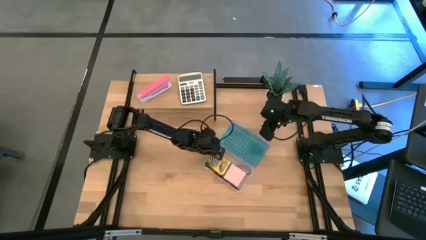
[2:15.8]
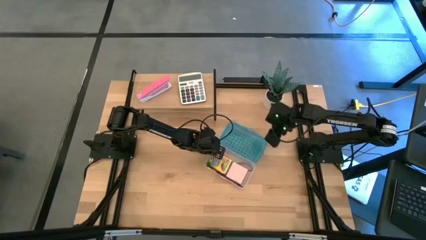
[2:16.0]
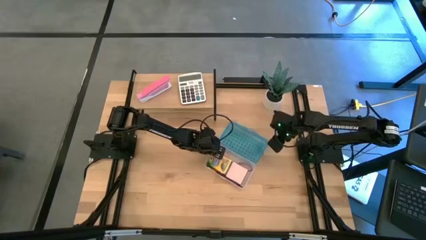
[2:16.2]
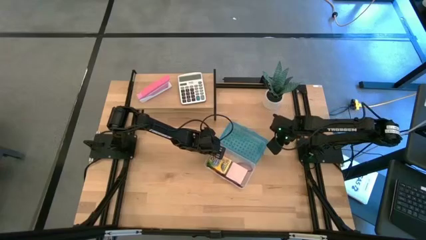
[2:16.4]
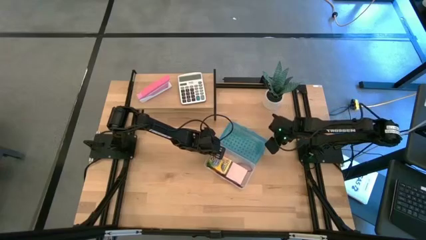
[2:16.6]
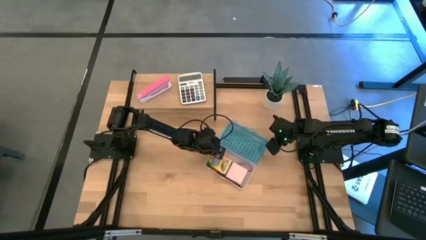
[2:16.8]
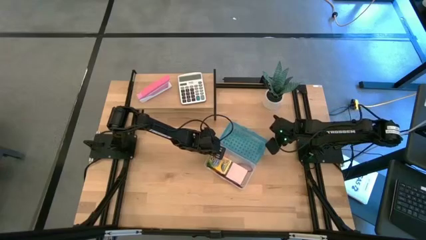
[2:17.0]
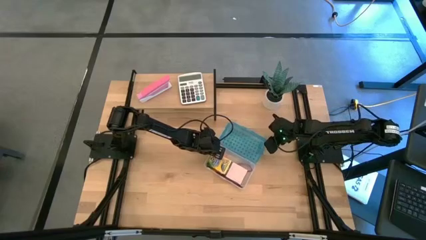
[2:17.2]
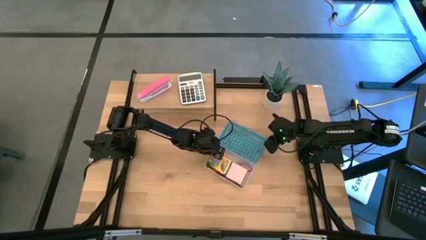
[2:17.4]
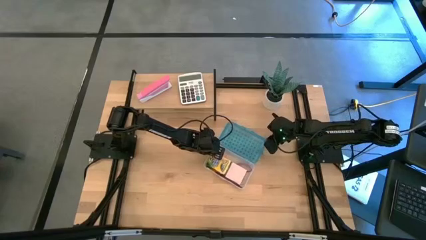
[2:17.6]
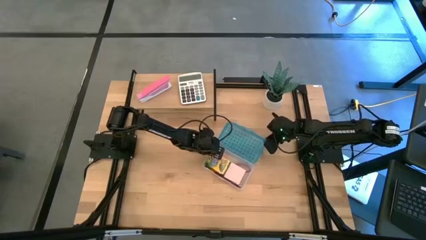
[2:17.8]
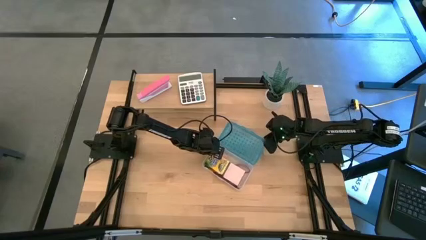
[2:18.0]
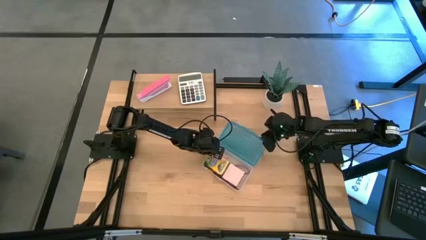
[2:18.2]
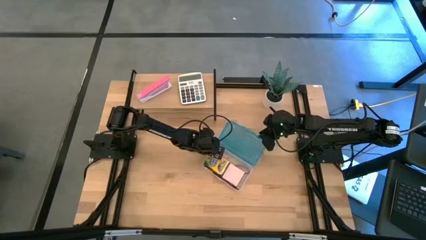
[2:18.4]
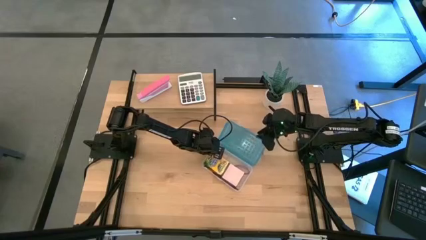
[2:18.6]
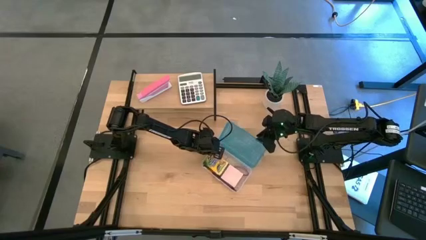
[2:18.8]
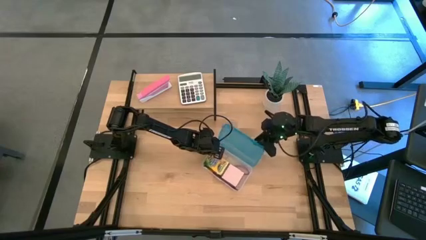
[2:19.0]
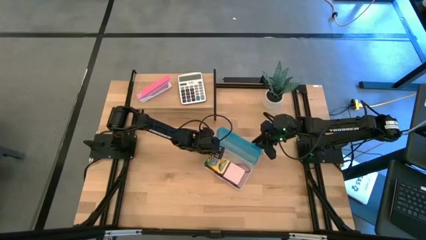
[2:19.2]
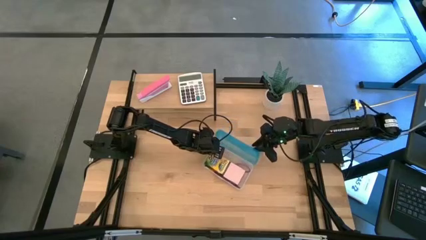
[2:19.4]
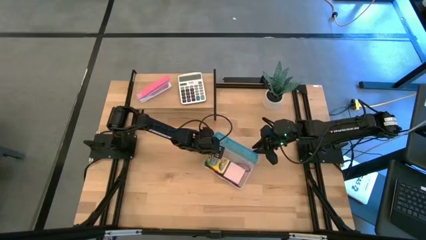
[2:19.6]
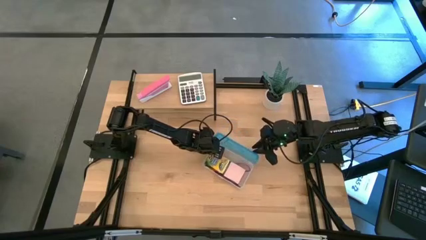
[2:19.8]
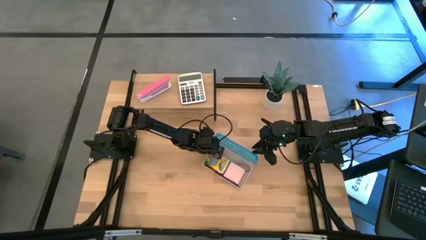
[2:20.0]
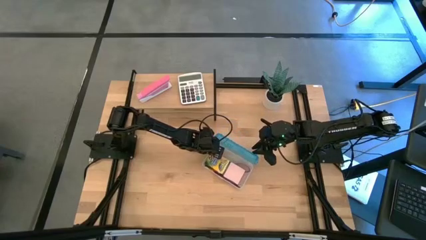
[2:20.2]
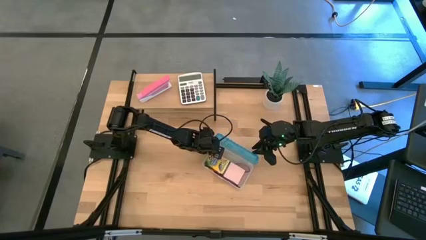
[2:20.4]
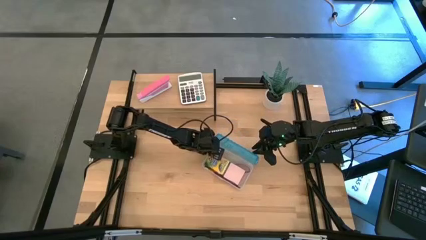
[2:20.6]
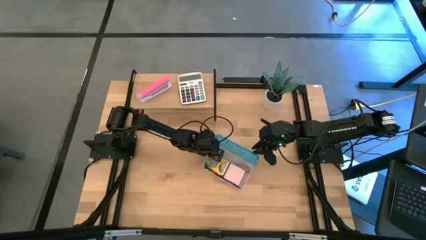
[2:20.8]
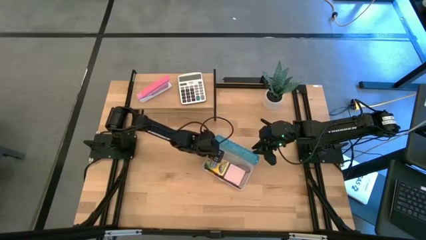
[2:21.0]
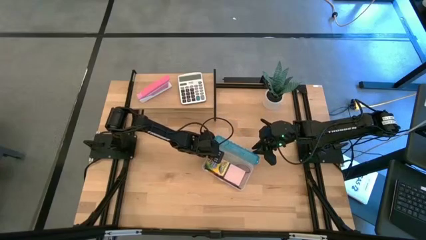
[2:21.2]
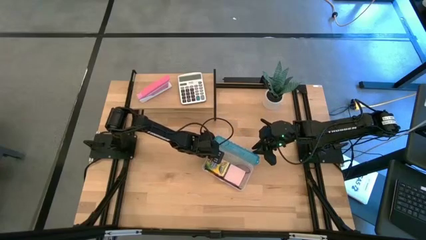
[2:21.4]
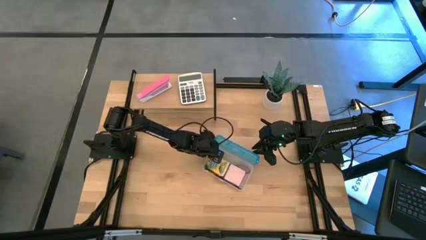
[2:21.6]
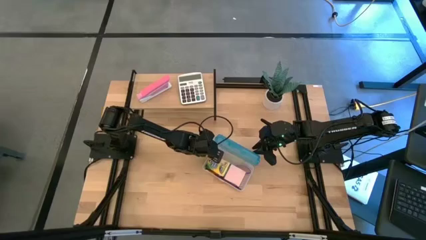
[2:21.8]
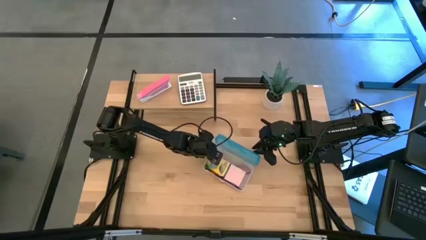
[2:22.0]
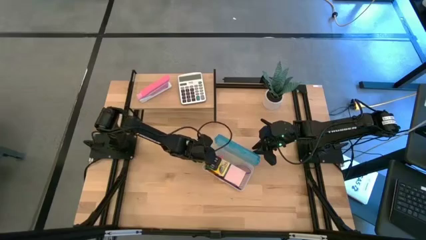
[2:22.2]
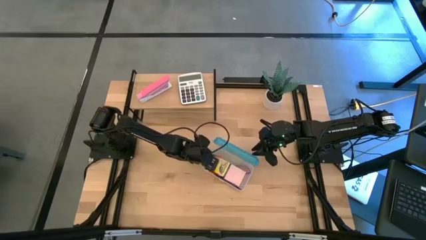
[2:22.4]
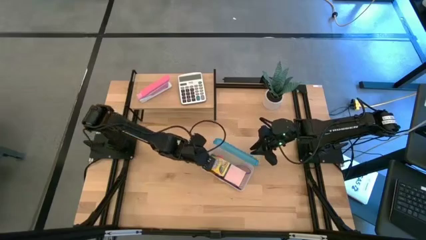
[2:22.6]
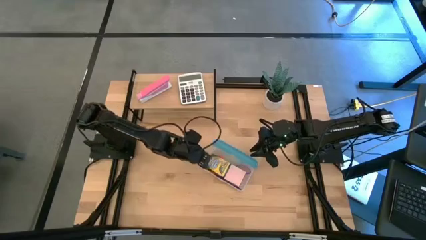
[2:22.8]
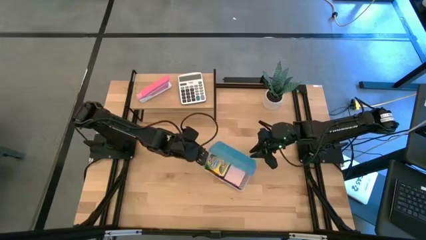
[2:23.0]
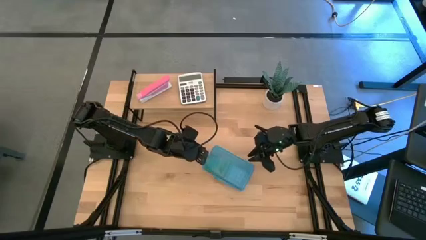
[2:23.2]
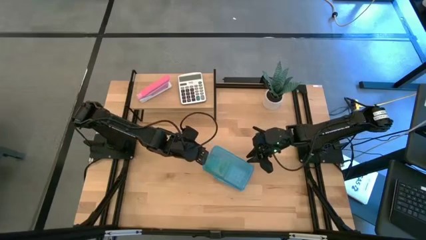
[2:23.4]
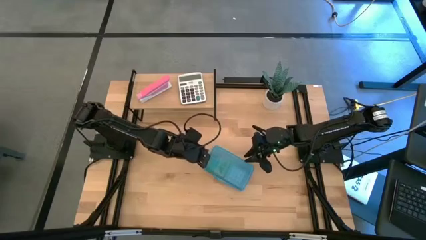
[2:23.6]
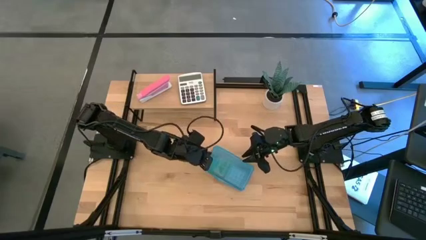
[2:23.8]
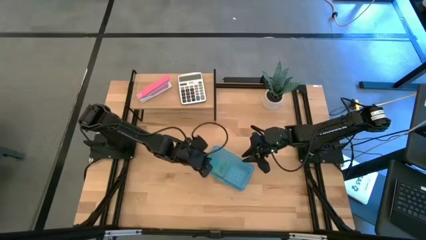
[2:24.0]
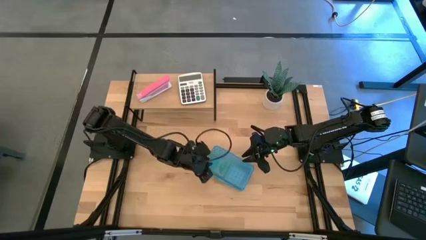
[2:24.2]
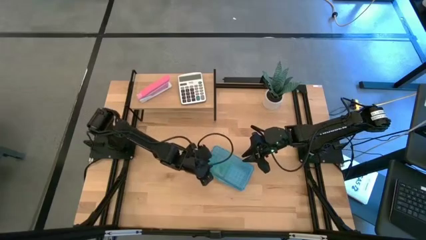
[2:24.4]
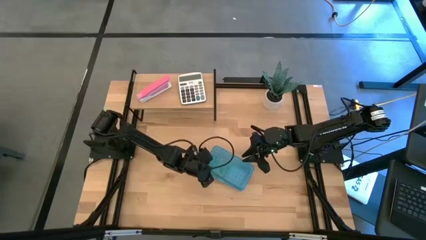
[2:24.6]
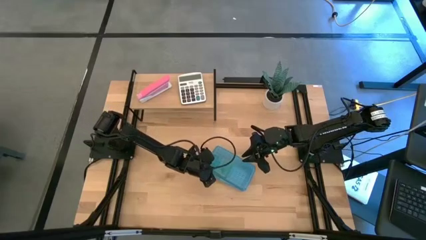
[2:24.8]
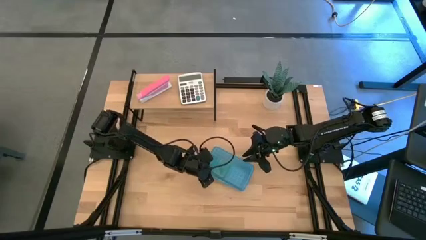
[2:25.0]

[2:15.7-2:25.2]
Task: Pack school essentials
Close the supply box

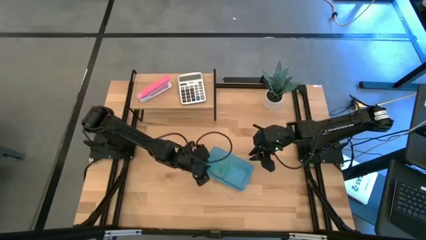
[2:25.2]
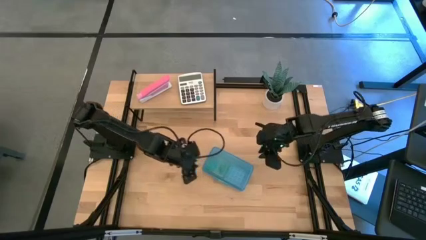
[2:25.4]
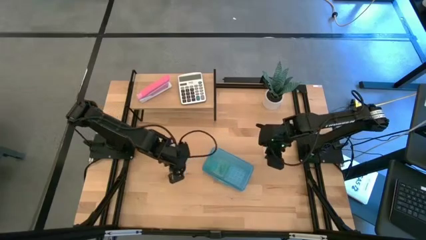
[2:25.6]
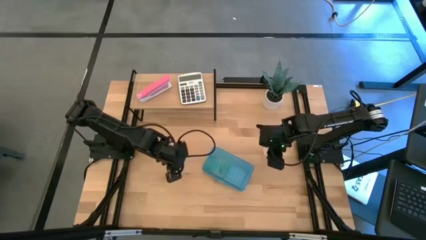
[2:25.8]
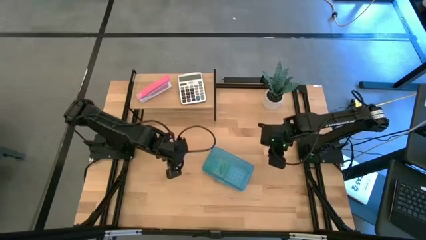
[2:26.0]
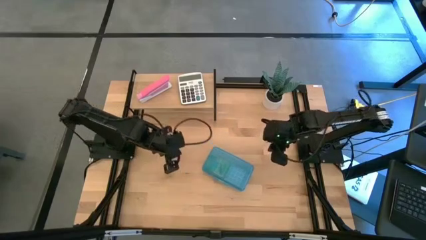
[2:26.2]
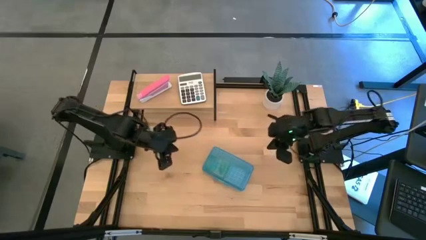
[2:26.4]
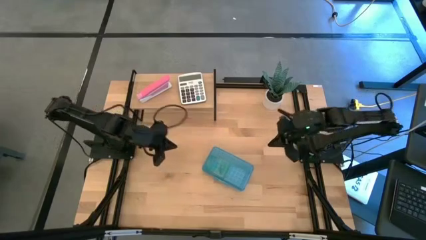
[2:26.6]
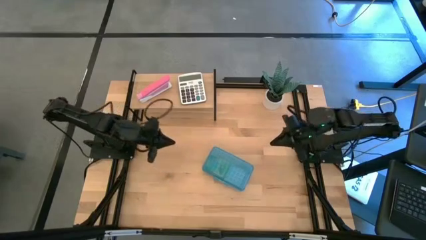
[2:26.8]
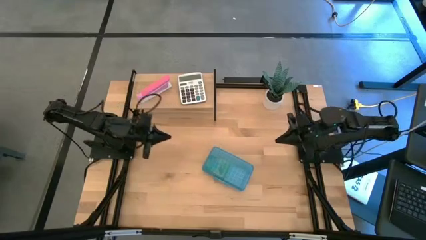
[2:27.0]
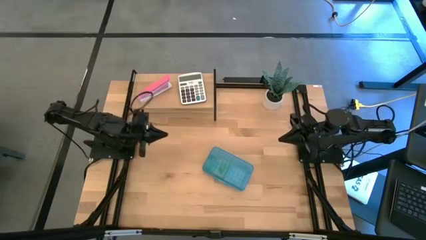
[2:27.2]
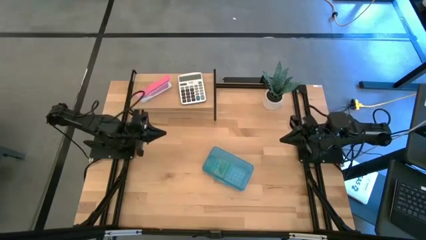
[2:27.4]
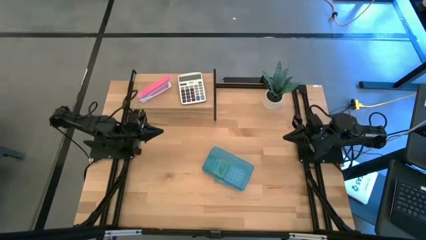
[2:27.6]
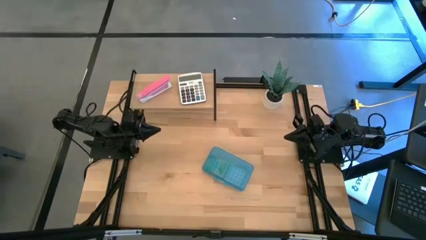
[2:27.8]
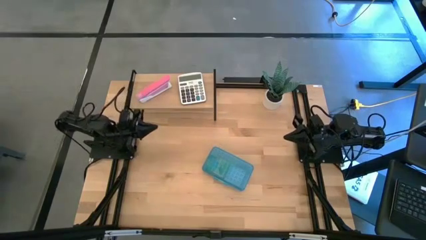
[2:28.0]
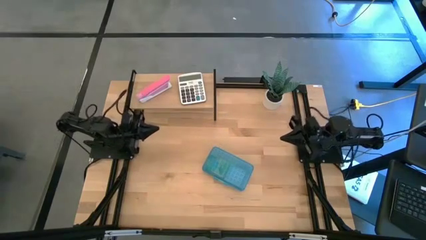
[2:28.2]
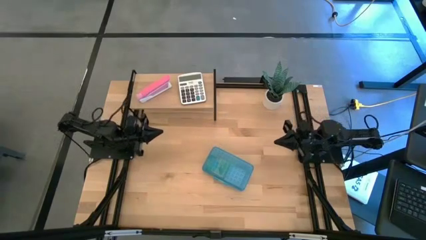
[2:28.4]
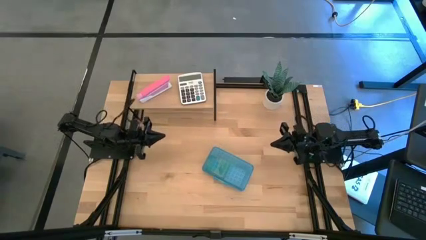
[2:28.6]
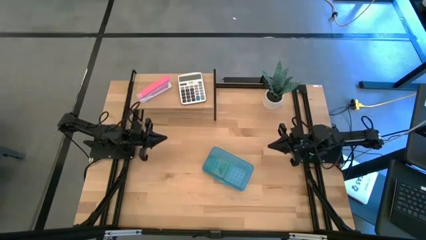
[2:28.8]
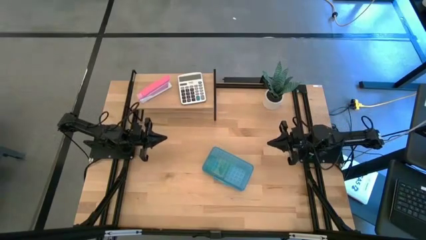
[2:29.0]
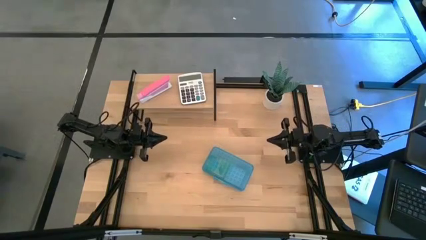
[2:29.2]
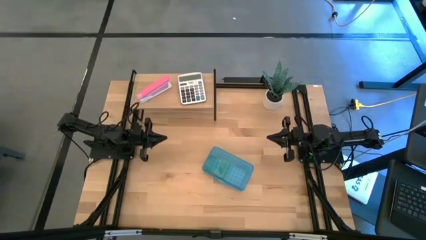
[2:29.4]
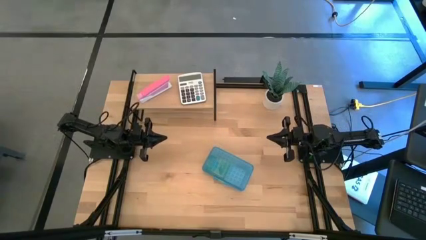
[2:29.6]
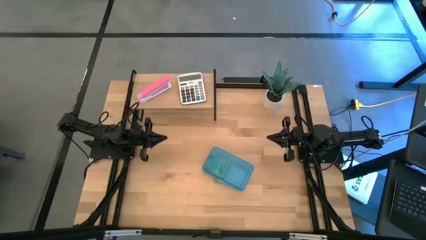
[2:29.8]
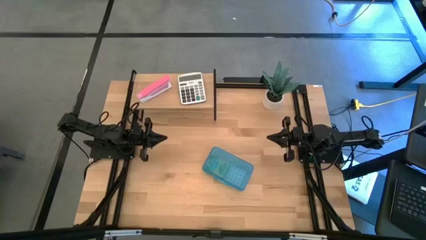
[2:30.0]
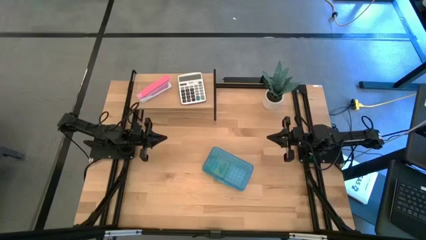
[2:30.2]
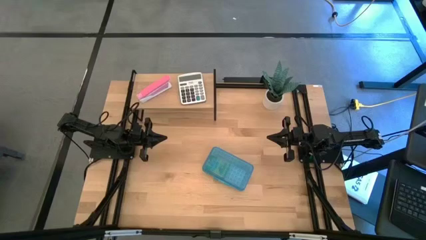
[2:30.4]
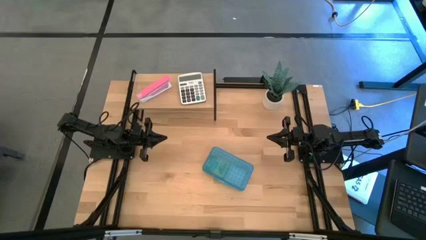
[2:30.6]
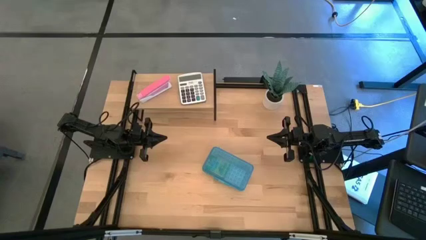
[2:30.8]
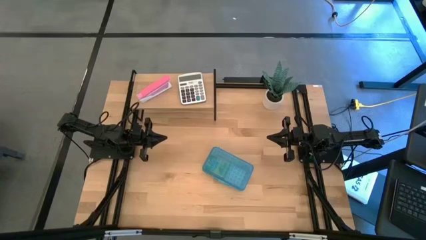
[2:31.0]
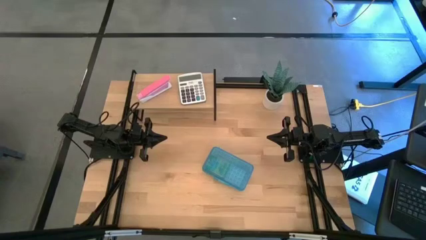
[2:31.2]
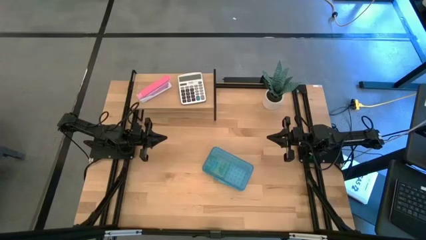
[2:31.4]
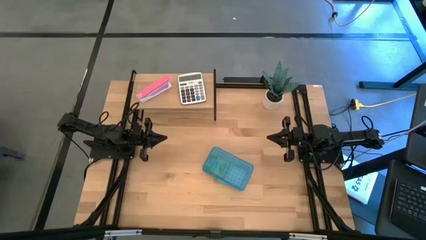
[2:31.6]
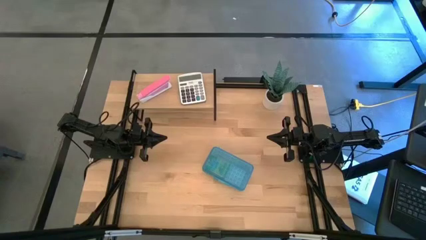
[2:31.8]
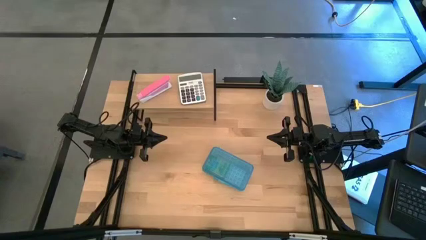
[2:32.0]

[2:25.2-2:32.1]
Return to Home Position

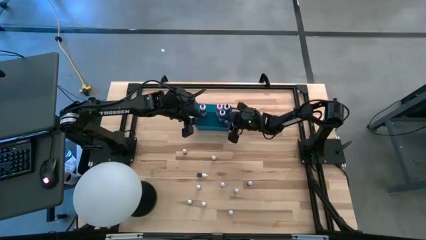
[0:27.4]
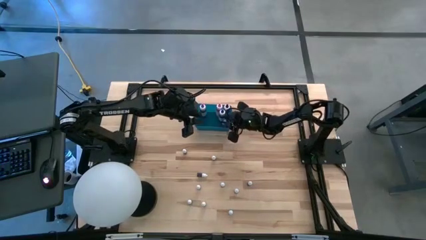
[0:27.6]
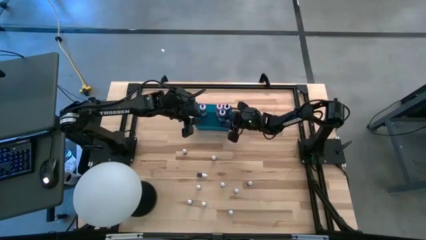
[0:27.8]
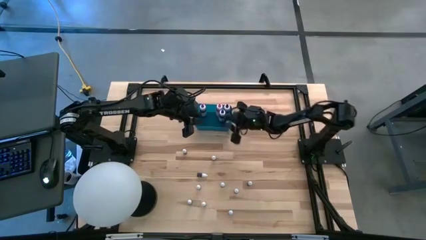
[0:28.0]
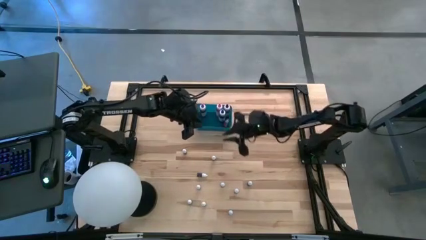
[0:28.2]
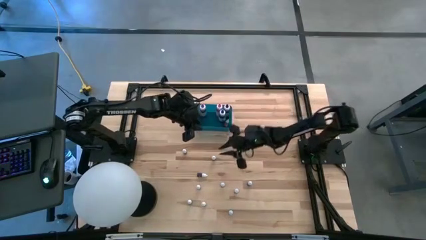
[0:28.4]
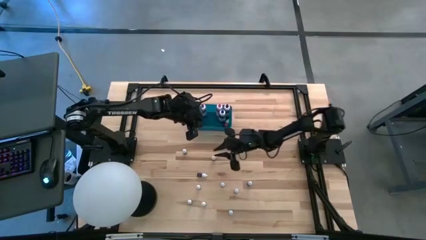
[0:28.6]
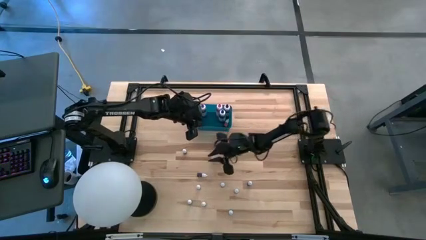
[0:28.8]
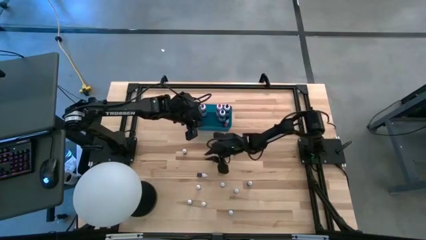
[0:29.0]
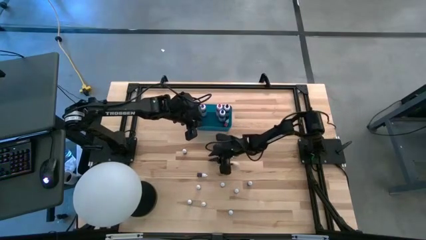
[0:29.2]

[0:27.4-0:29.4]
Task: Pick & Place food coloring
Put the black food coloring into the blue bin
